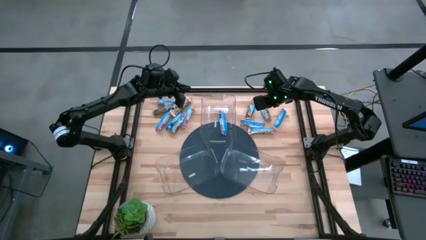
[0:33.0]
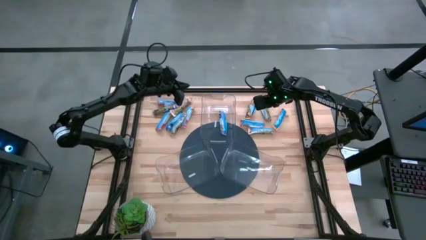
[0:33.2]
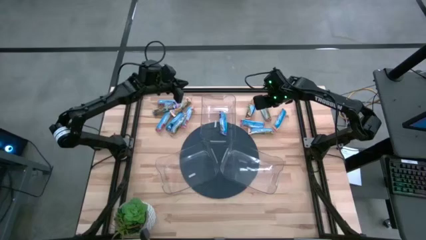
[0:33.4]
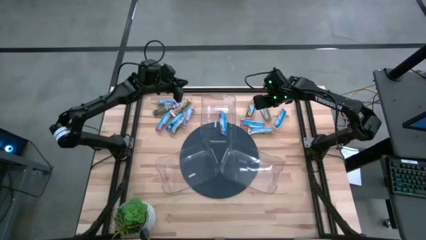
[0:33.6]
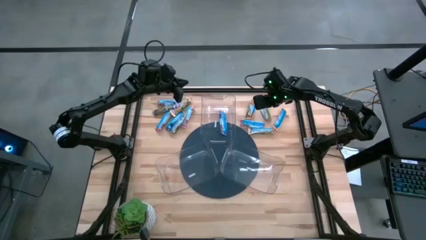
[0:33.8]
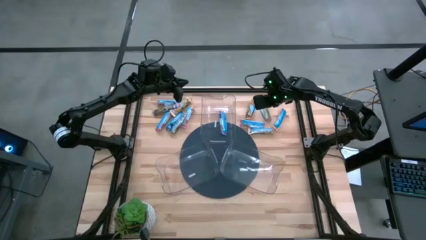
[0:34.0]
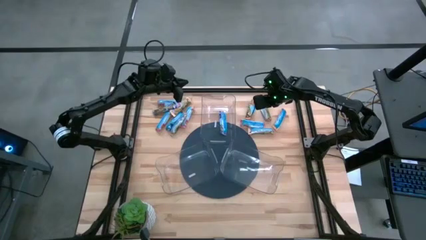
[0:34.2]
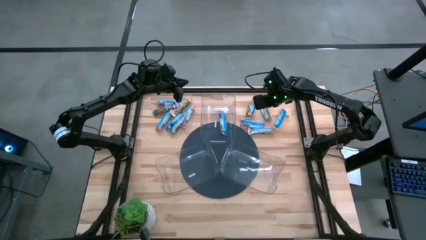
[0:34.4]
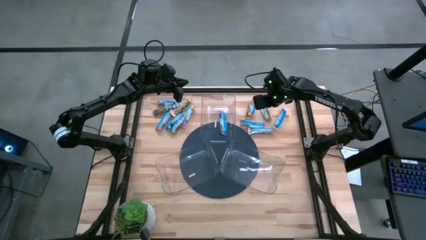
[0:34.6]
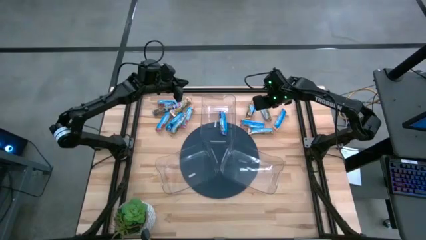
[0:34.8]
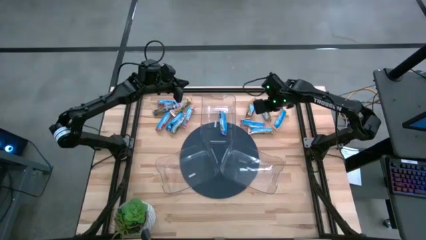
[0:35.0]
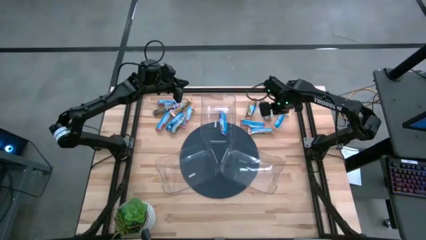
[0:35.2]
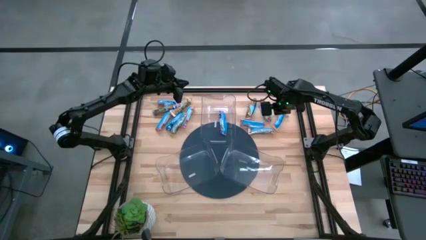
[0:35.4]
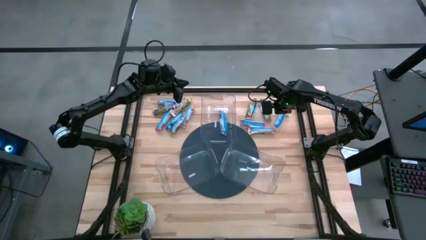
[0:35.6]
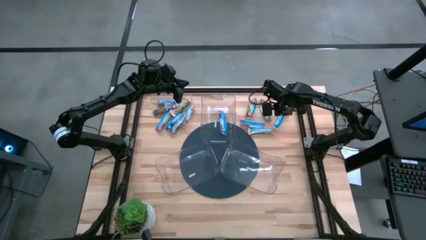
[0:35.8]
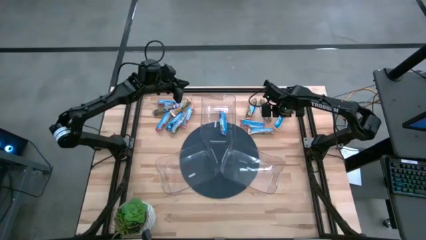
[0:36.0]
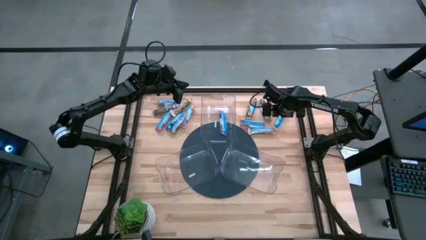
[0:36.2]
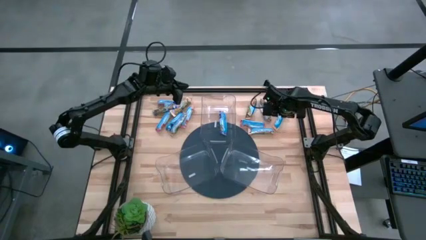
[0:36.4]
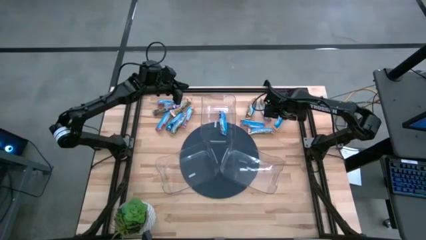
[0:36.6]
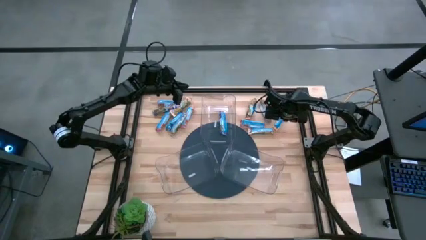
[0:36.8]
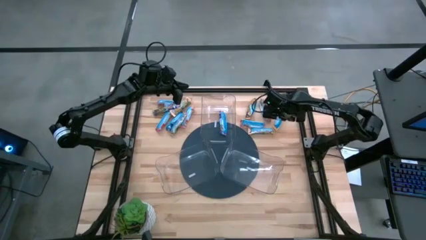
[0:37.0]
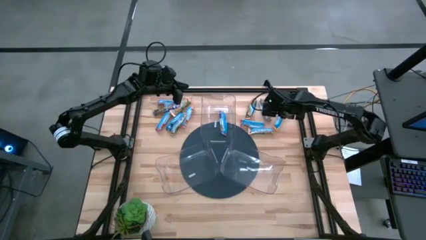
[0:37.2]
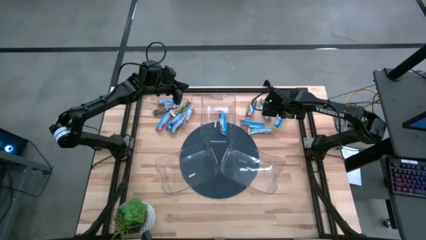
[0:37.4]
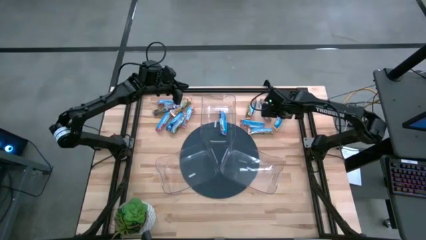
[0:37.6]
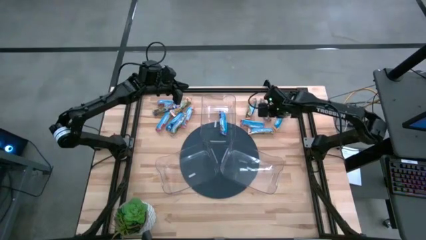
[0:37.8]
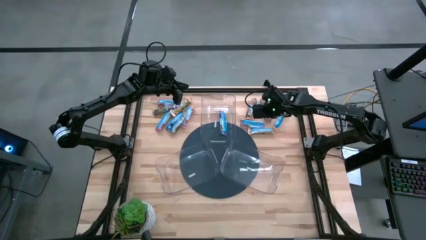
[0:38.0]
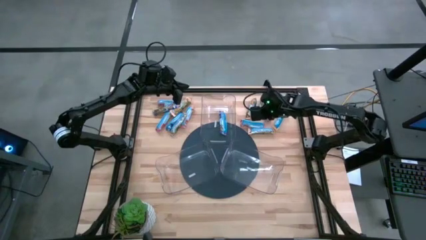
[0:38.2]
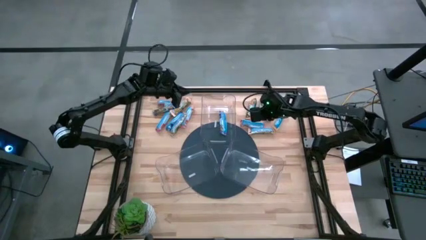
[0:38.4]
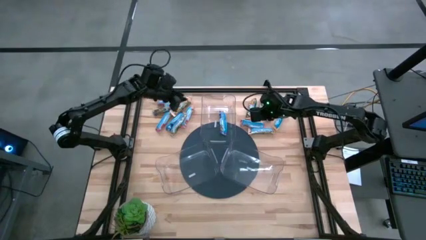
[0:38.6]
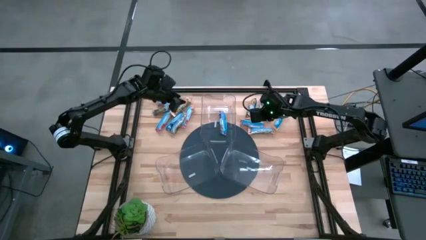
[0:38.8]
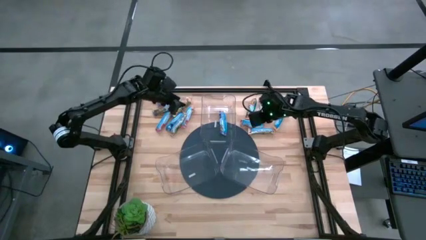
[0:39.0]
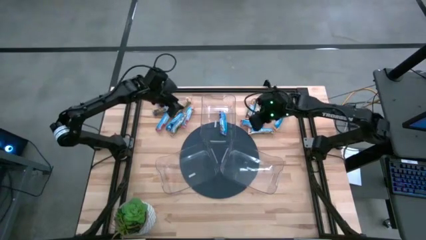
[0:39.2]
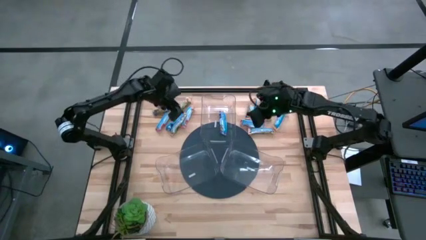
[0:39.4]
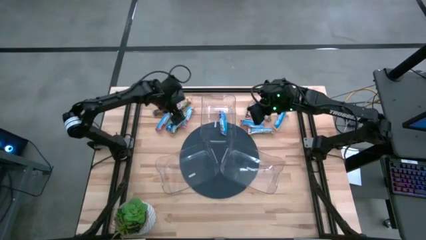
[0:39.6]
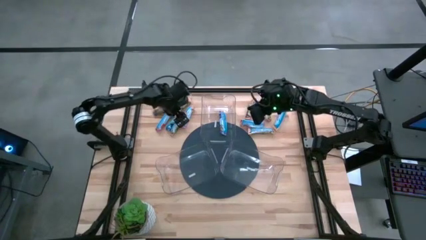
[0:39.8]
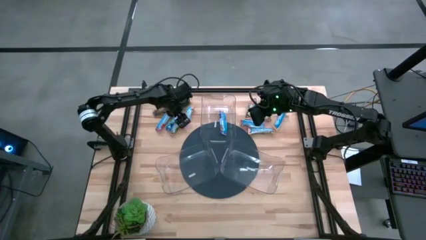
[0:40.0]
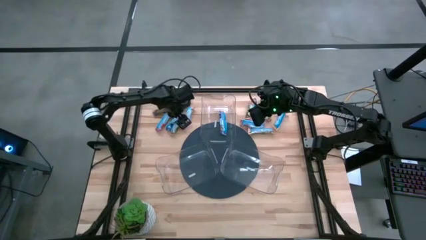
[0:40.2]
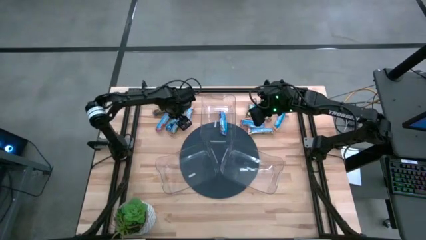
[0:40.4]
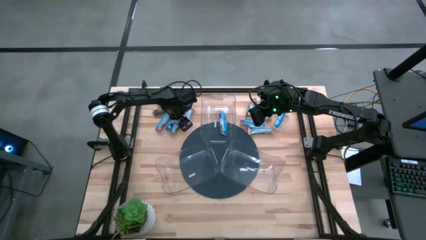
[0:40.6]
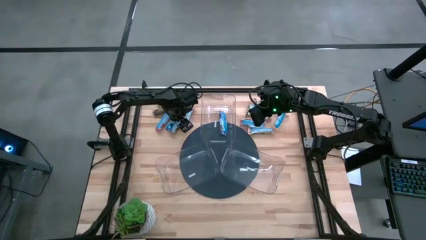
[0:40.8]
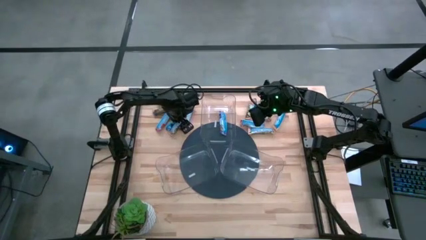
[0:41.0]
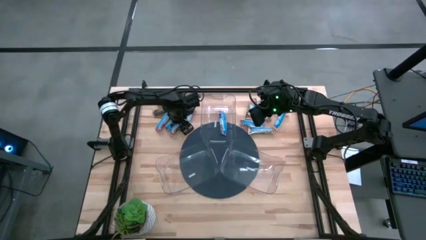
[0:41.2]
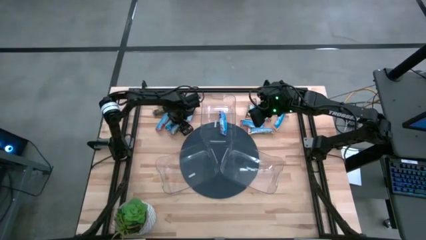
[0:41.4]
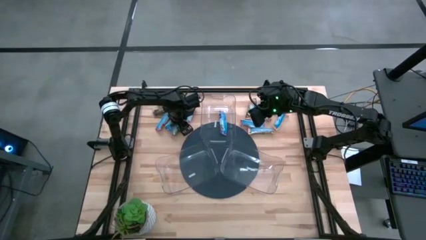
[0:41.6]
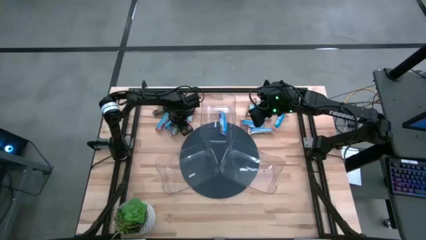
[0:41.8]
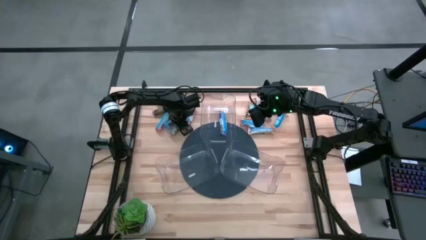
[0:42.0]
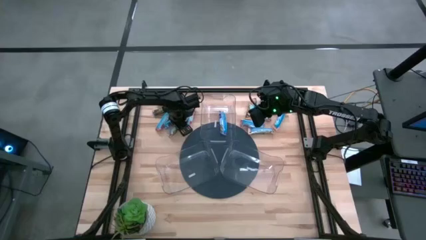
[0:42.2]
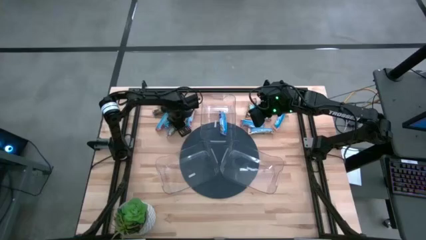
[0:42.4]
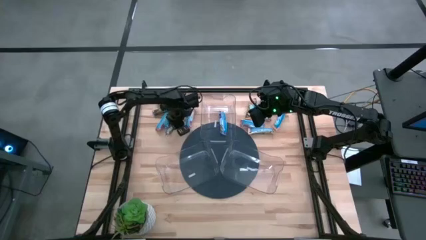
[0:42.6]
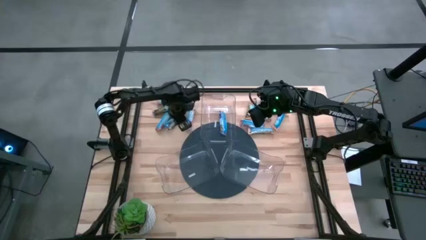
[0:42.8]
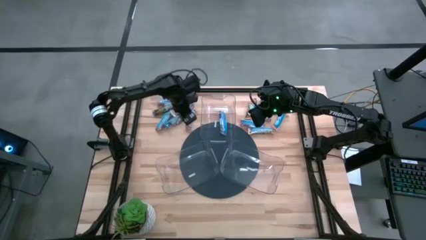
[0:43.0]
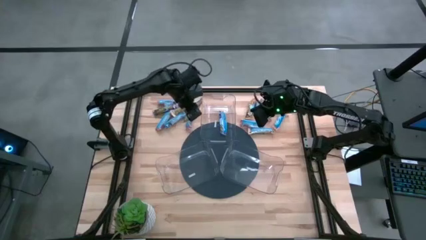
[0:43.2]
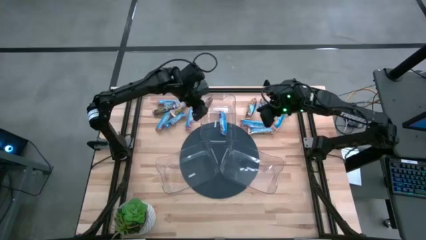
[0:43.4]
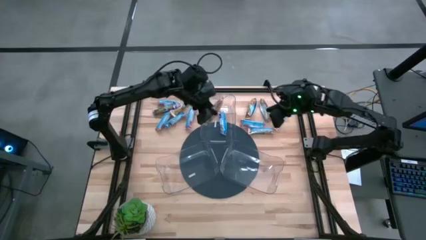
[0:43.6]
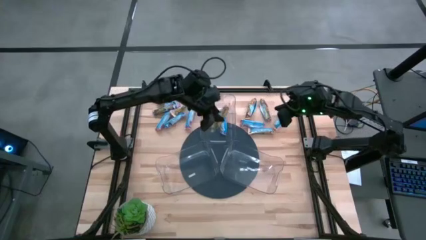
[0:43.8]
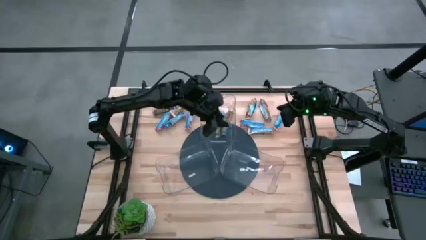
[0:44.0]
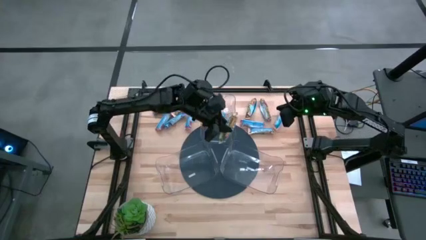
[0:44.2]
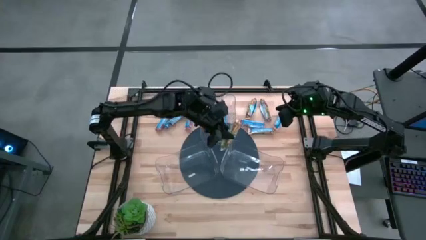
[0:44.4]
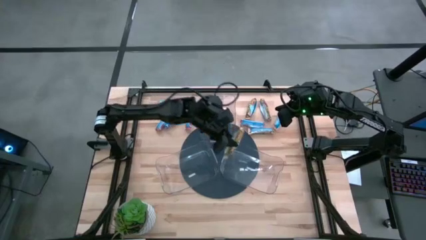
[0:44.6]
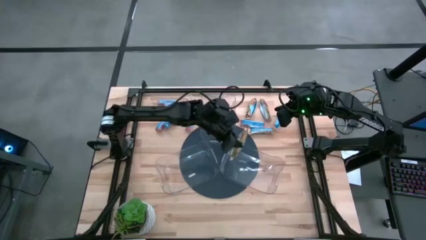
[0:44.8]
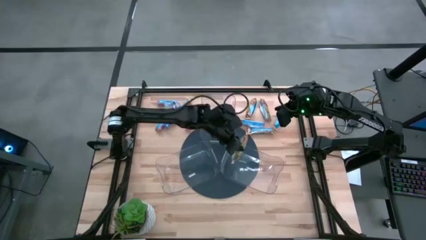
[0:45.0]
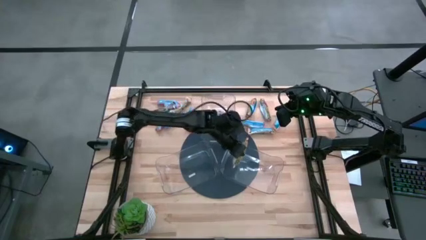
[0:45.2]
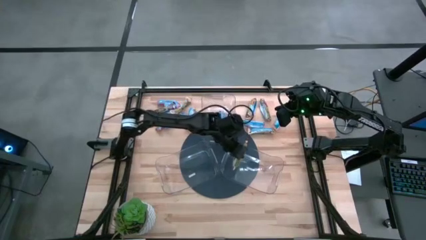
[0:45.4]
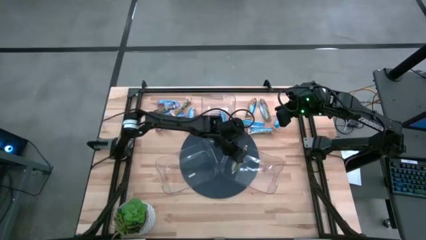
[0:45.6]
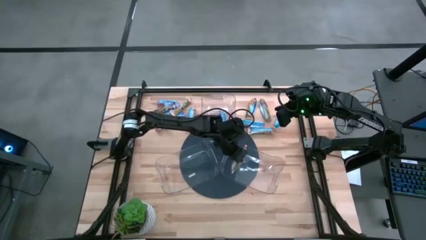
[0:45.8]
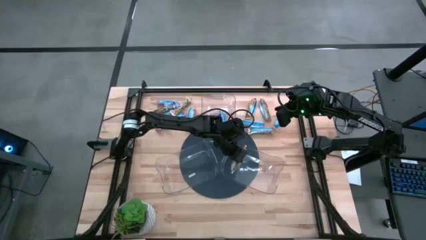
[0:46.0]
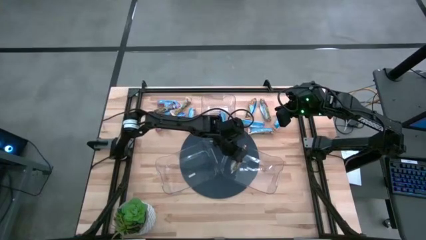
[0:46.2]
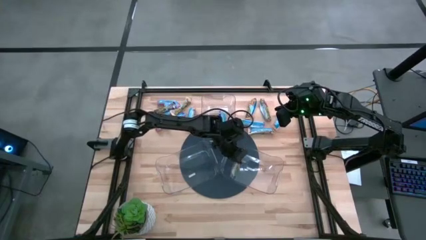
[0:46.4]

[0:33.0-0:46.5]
Task: Pick and place Granola Bars by type
Put the yellow granola bar into the right transparent bin

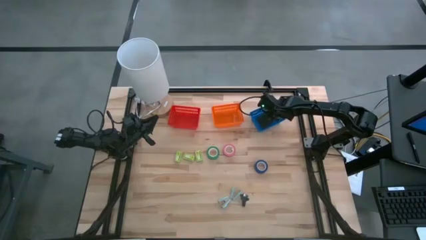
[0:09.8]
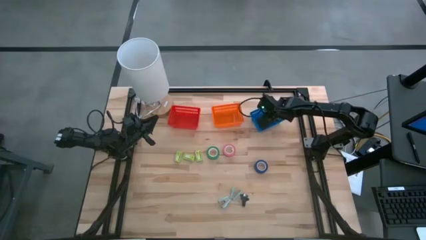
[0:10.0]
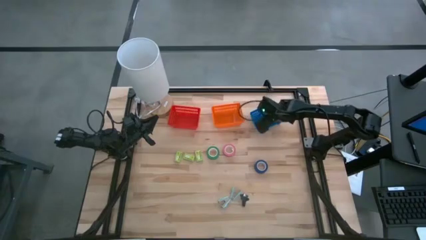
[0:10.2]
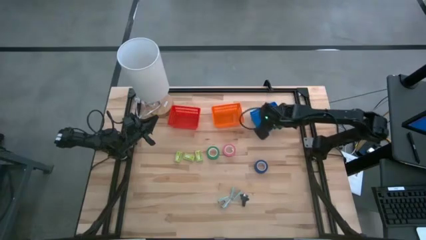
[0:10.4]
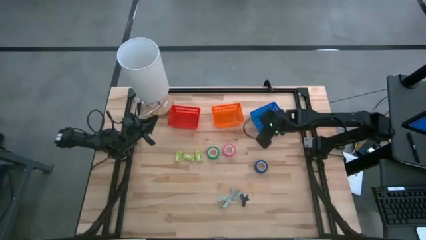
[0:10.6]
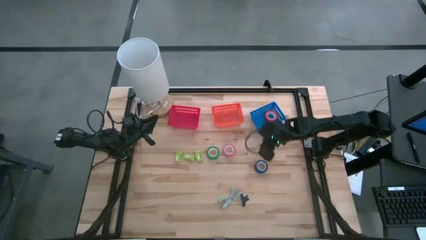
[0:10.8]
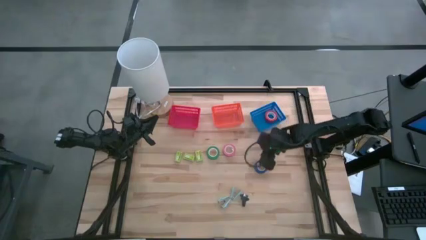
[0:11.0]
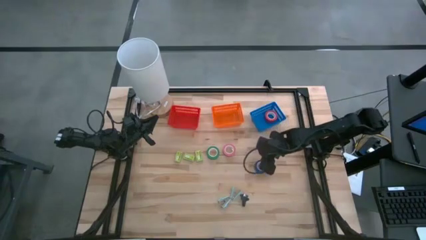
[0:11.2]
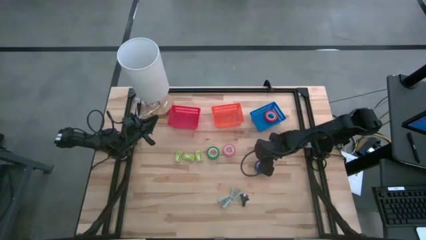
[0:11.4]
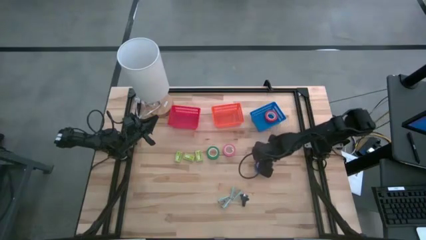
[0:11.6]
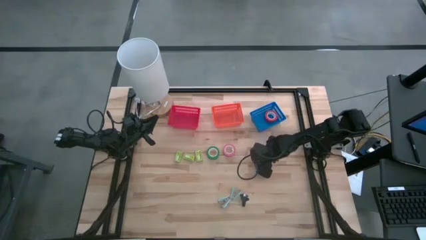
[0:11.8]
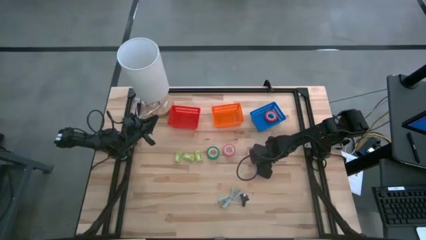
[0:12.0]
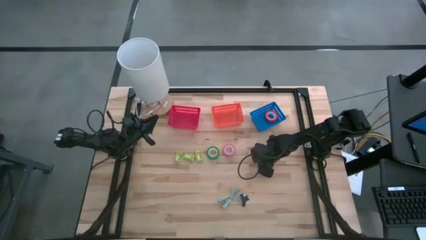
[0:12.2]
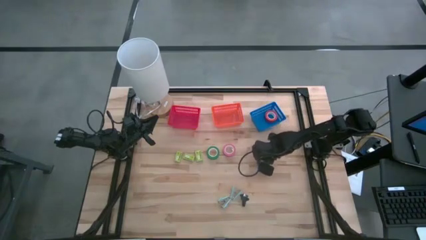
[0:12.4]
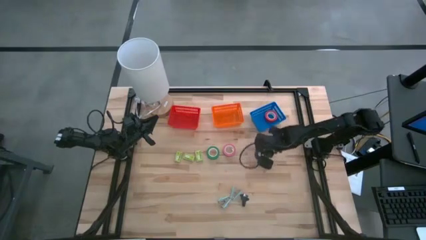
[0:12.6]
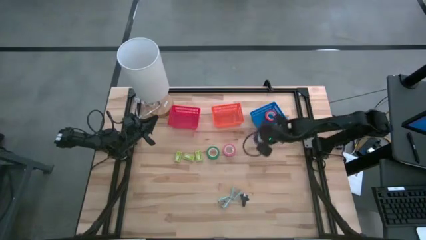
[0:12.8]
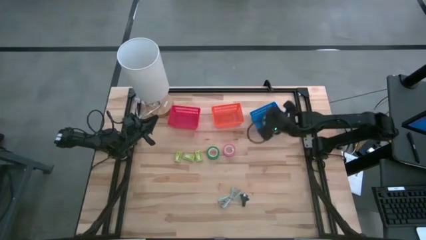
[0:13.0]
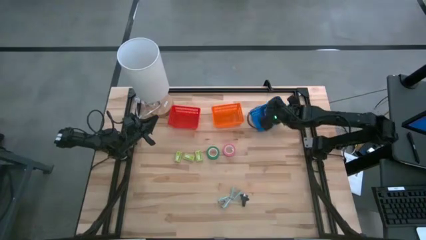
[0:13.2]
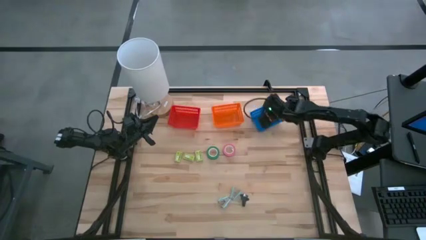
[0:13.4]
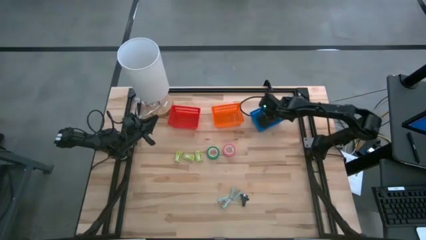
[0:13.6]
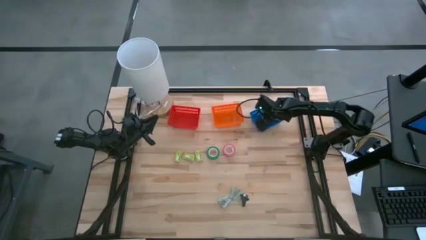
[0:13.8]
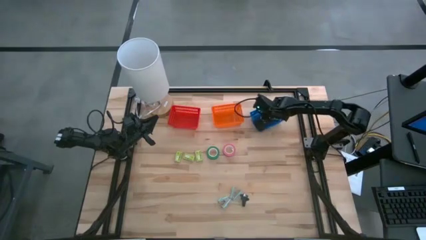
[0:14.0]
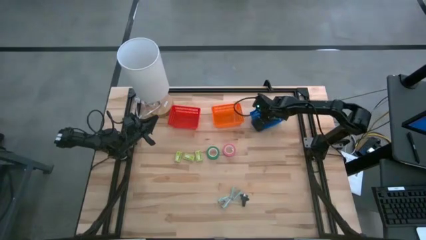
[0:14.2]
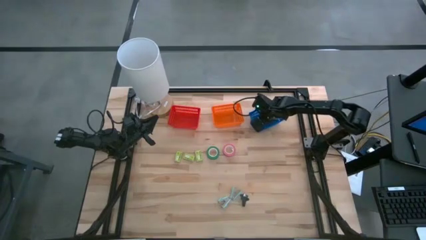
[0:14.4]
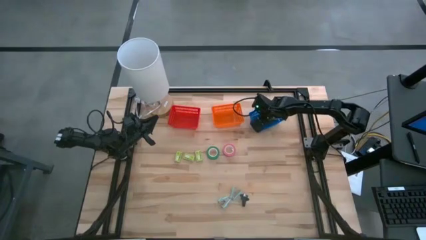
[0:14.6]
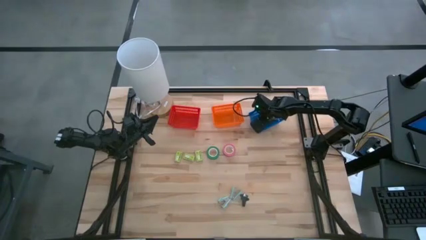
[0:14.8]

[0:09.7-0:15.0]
Task: Pick and place Stapler, Stapler remover, tape
Put the blue tape into the blue bin
